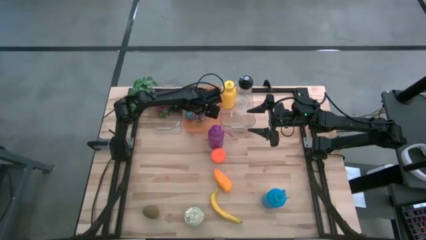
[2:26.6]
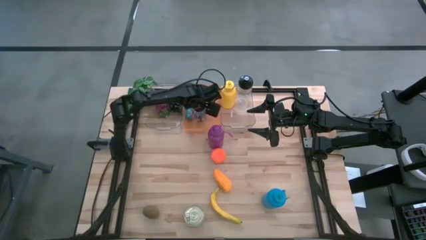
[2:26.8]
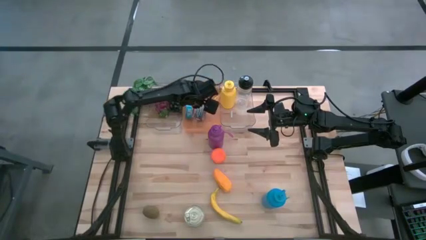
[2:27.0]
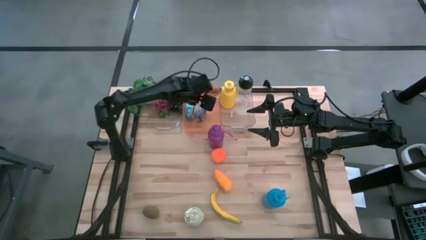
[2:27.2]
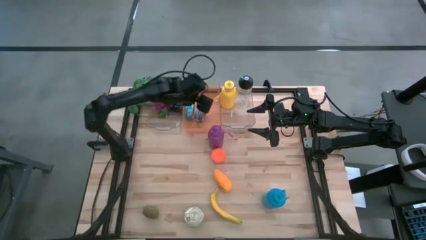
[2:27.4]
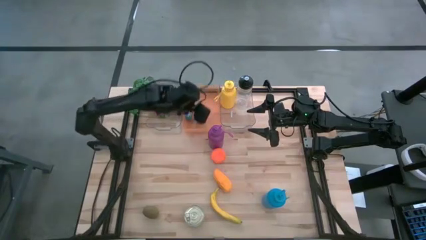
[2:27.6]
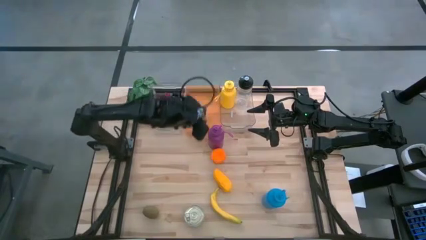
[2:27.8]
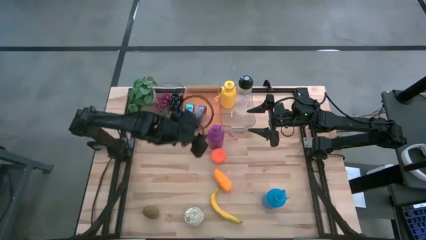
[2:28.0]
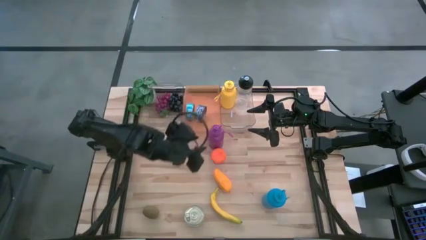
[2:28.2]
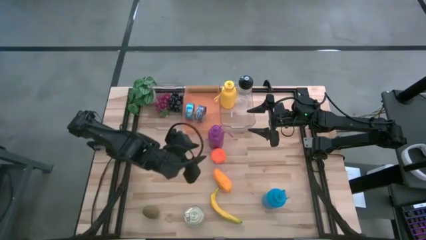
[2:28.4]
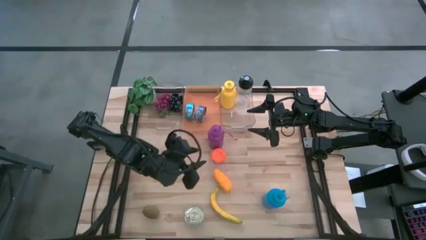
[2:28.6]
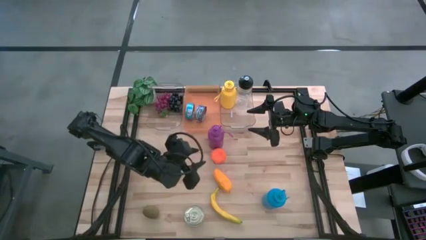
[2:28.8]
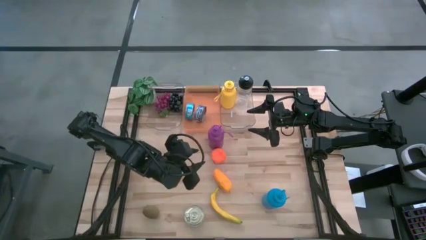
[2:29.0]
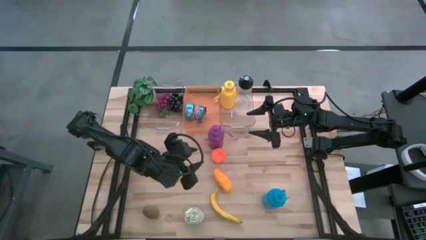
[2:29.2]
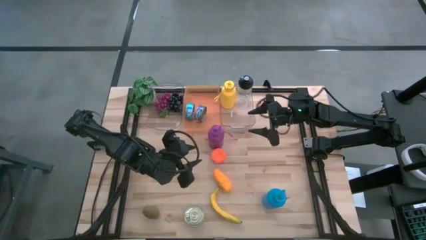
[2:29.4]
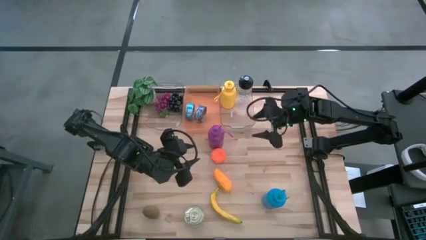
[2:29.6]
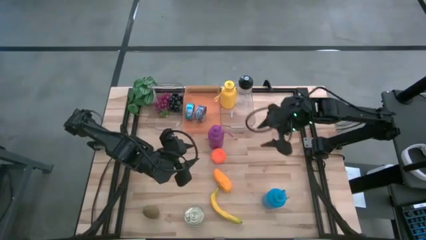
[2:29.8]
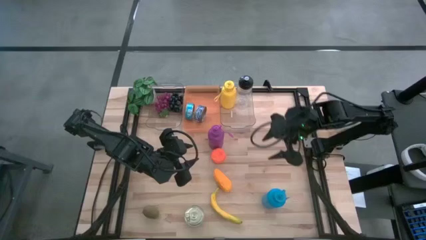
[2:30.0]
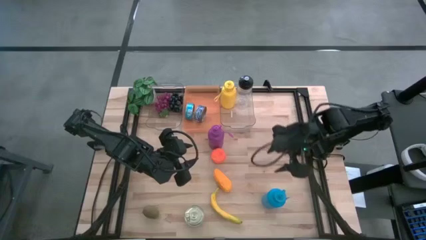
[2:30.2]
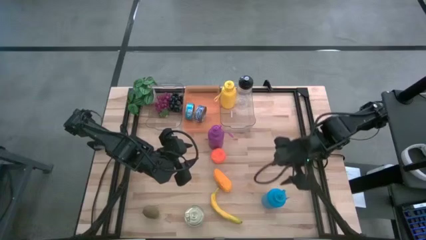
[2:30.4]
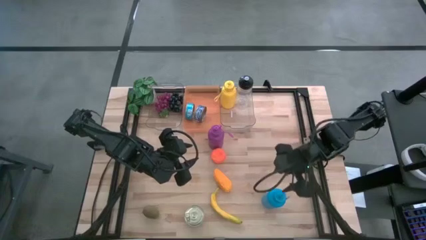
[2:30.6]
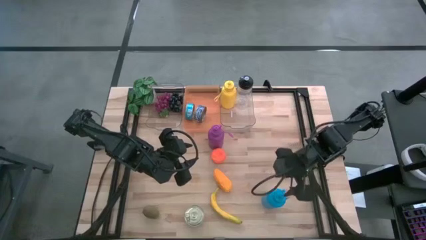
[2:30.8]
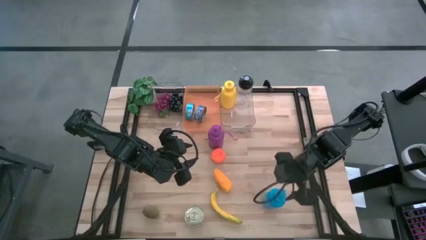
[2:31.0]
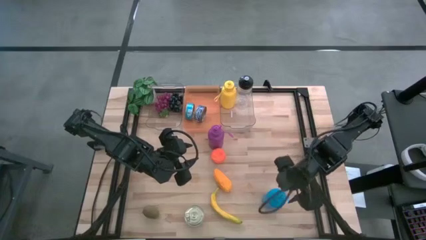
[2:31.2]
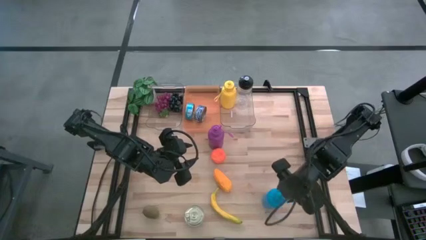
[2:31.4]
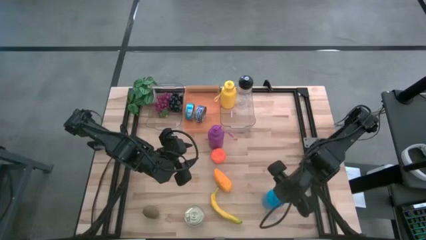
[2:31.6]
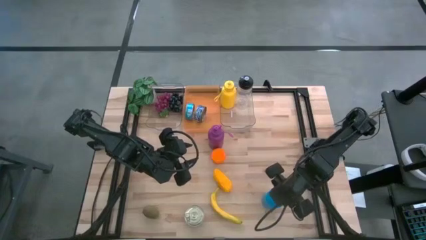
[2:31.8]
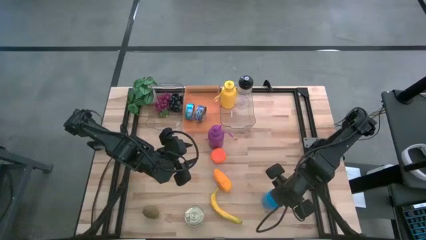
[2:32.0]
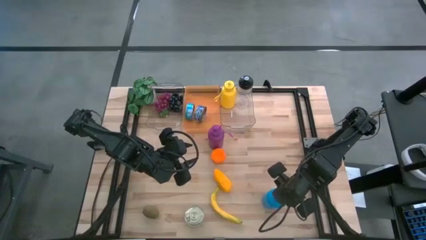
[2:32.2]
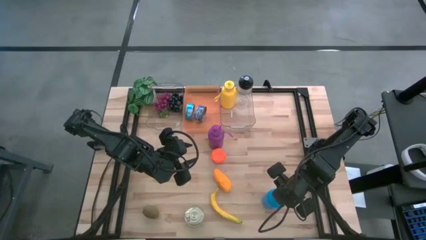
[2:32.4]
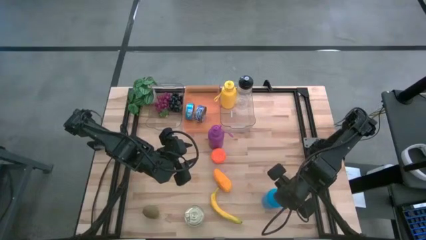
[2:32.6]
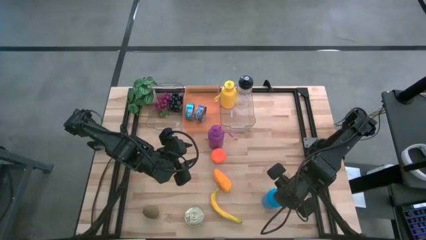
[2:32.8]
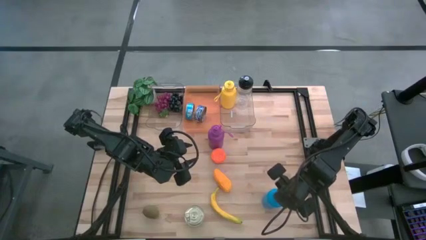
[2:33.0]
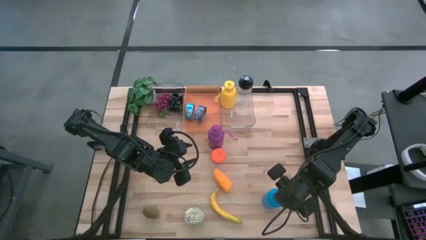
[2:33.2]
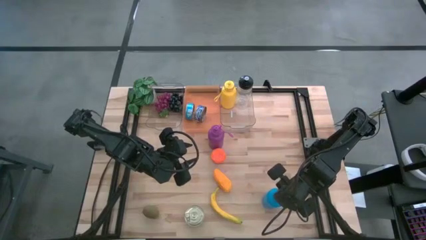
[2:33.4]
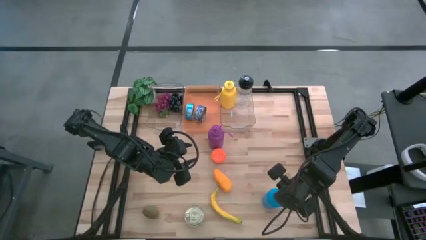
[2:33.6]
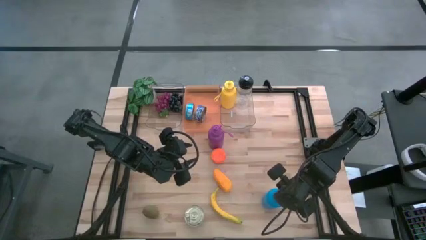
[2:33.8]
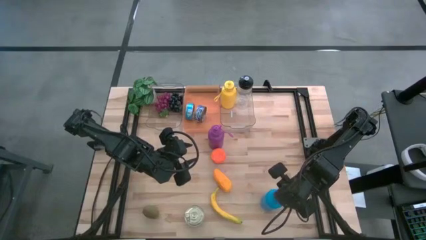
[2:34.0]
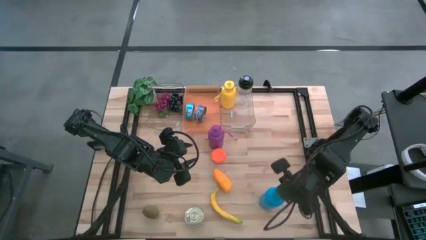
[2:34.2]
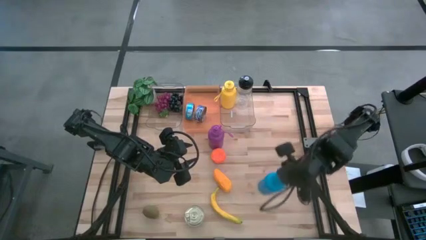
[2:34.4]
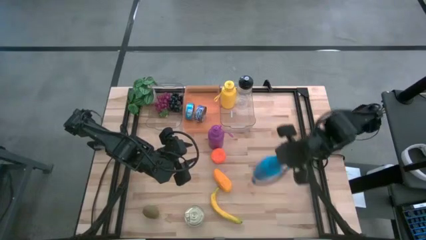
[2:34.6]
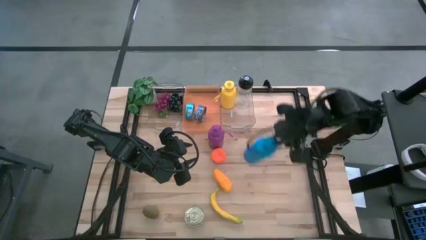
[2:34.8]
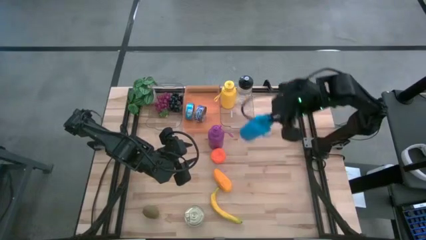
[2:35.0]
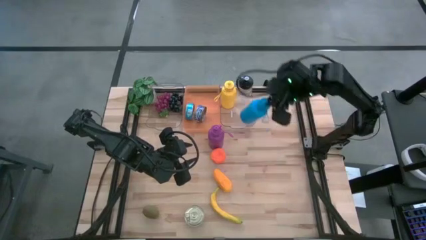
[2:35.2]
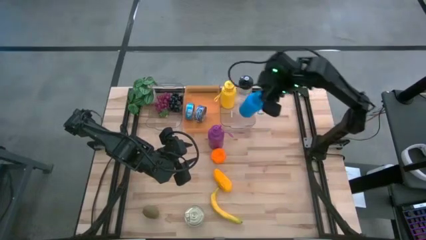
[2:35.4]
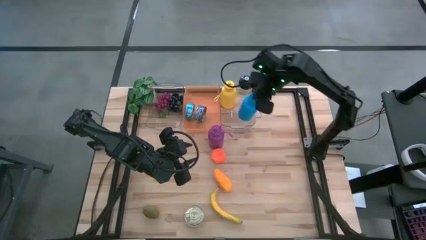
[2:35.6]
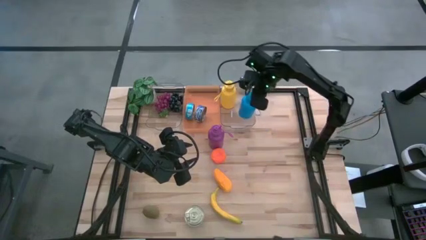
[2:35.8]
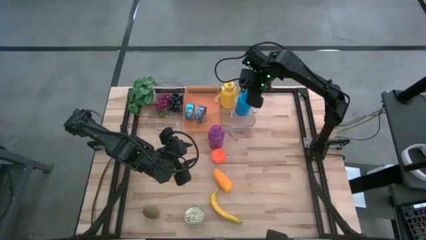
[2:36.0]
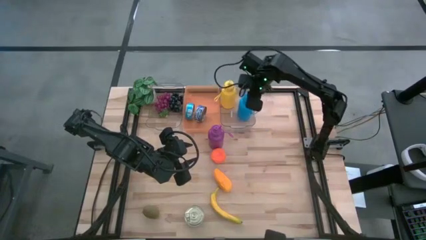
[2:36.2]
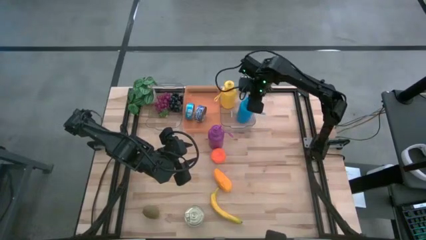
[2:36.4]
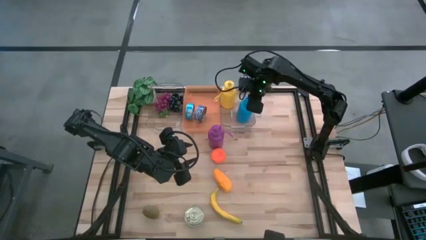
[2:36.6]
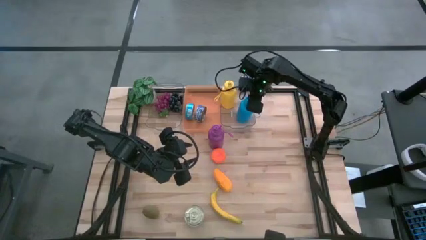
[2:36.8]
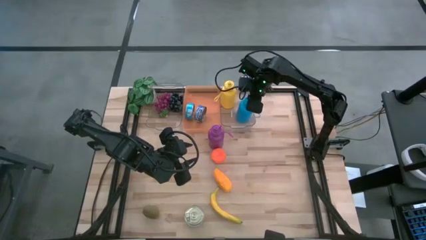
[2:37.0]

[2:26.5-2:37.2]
Task: Pick & Place Food Item
Put the blue water bottle into the right transparent bin

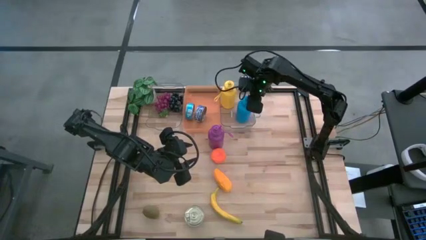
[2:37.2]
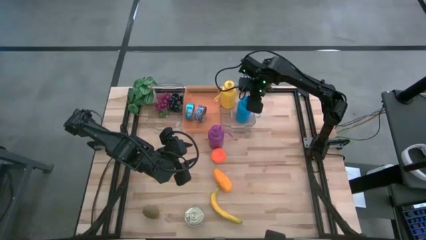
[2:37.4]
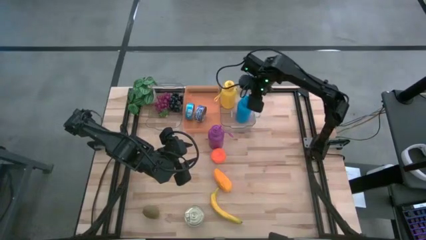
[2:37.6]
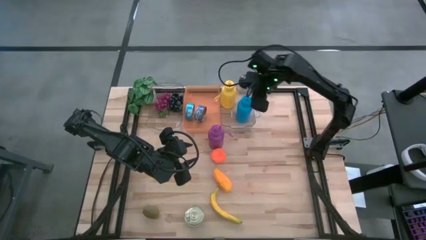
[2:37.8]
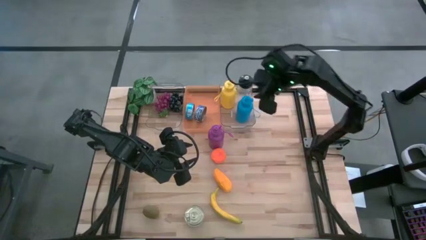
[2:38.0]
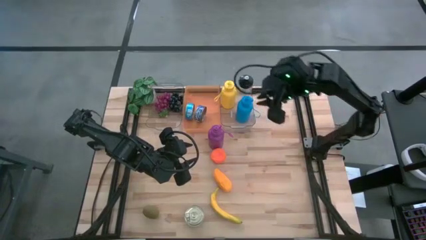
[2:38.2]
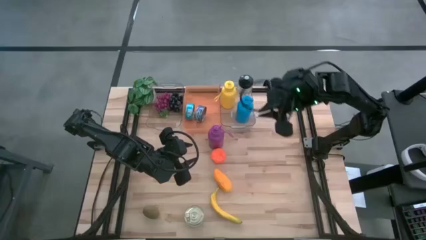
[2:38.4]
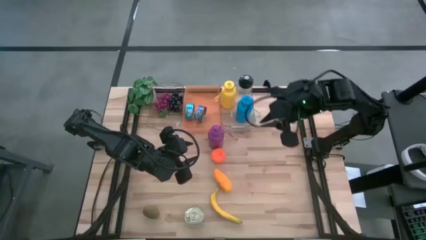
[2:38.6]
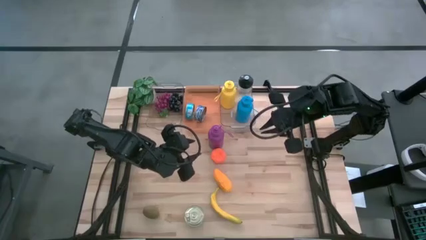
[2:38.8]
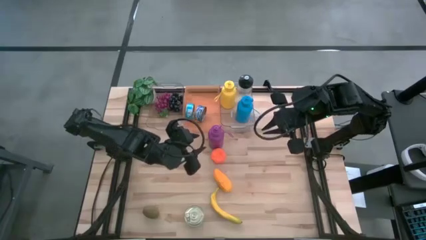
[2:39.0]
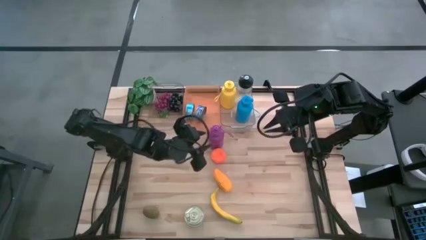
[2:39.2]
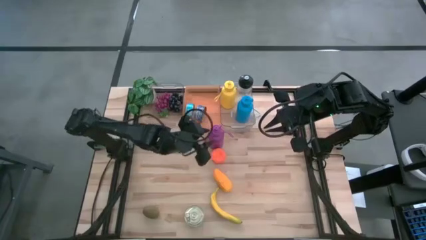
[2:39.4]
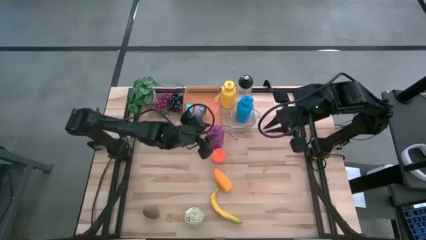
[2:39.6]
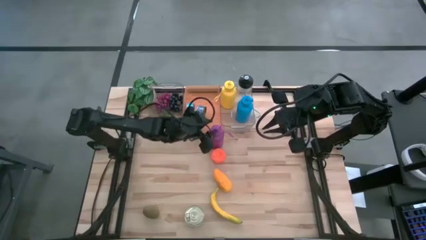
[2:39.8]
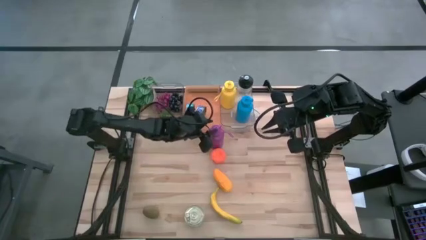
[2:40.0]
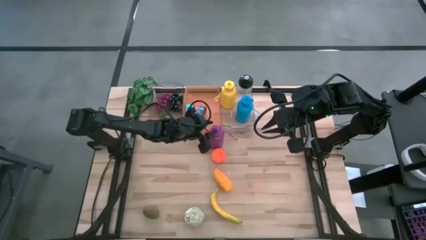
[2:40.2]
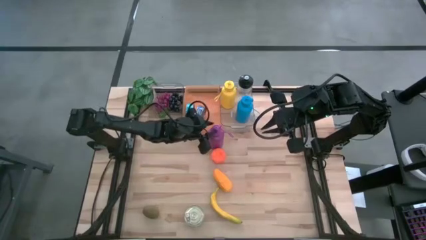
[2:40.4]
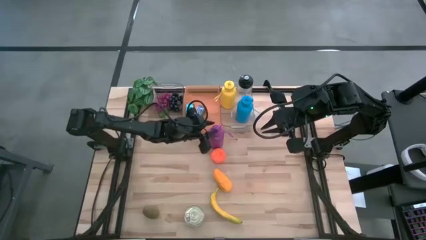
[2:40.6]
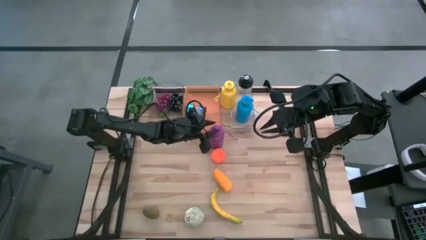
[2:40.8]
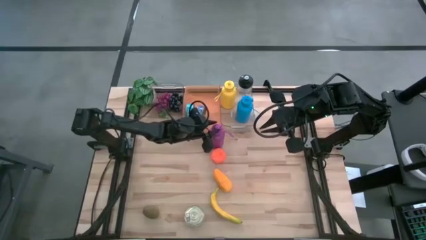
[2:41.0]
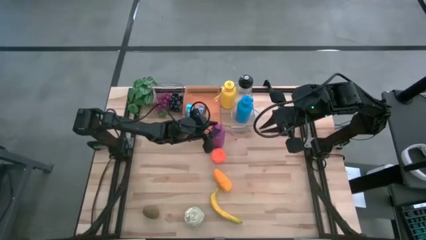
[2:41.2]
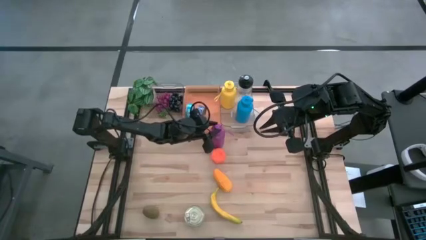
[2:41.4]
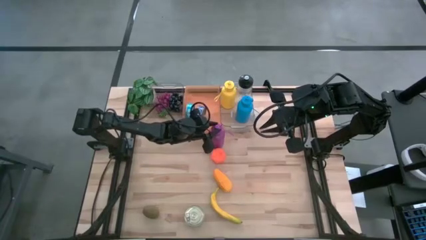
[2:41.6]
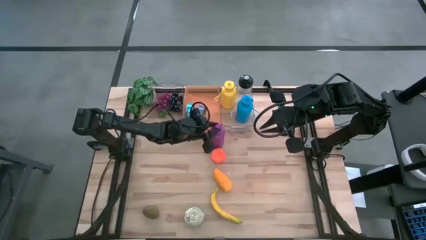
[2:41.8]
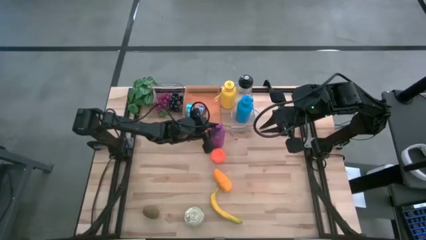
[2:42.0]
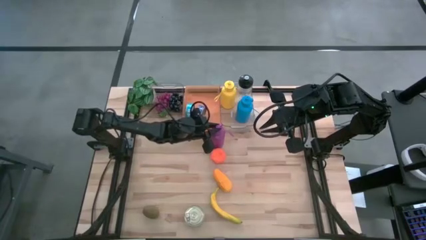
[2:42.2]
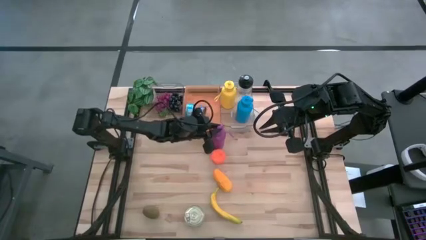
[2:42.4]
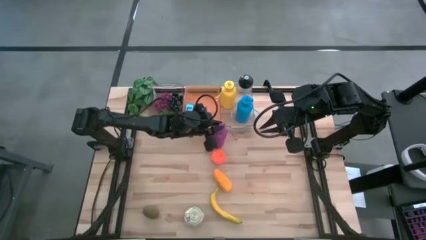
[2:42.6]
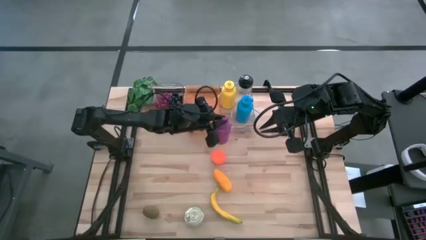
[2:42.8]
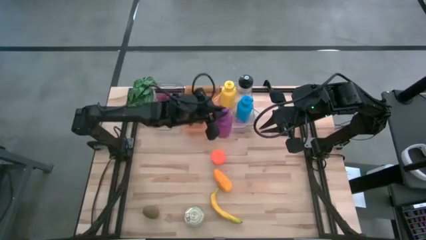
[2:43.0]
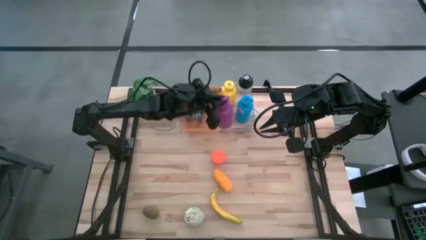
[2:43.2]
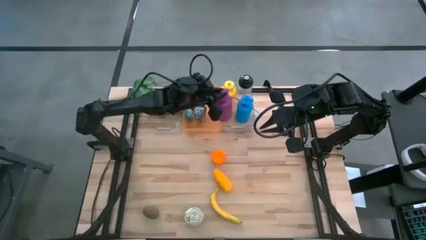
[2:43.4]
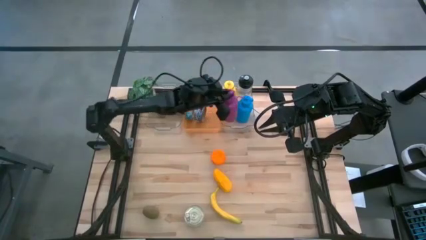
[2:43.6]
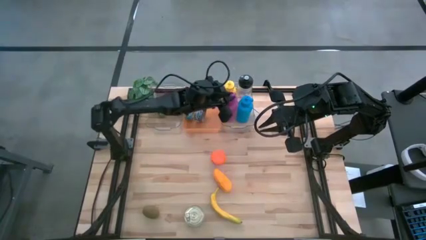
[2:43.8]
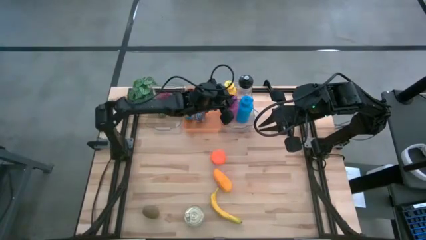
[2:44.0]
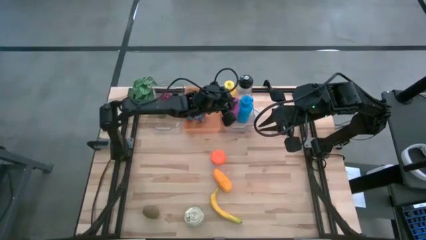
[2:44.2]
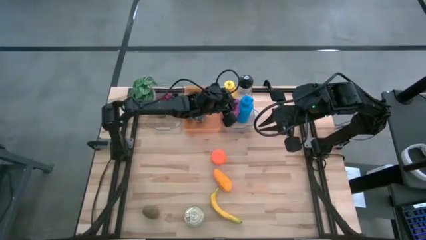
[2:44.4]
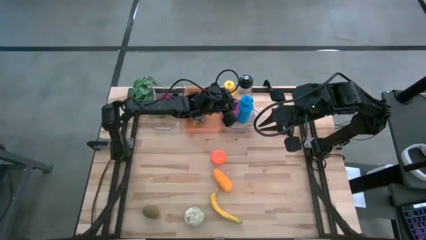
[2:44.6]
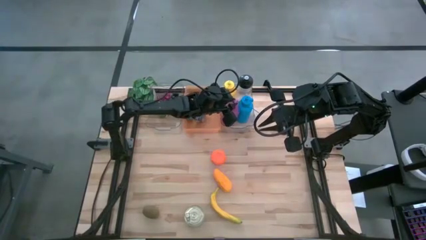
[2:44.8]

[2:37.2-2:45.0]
Put the violet water bottle into the right transparent bin
